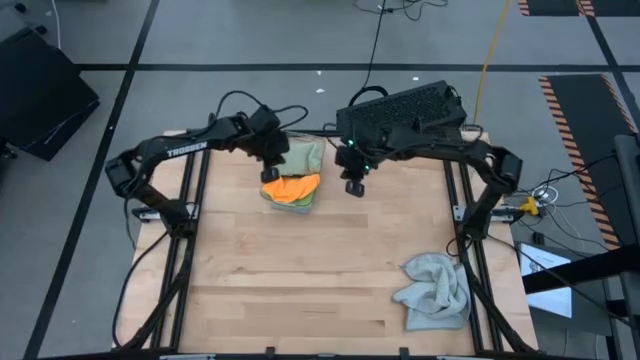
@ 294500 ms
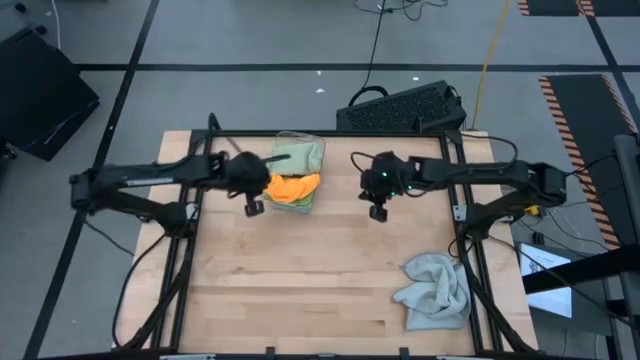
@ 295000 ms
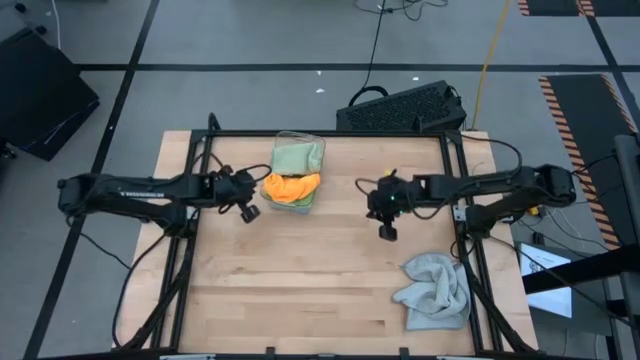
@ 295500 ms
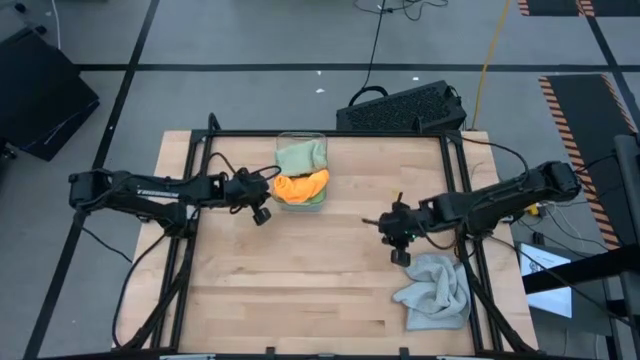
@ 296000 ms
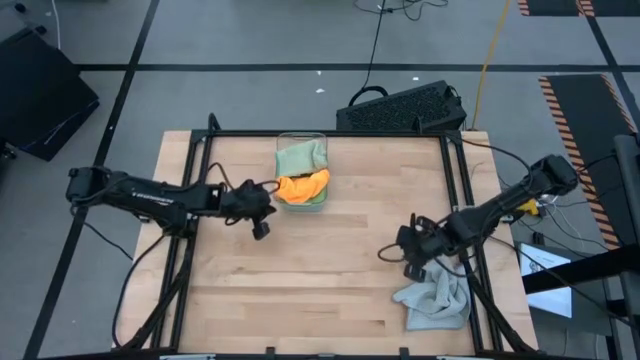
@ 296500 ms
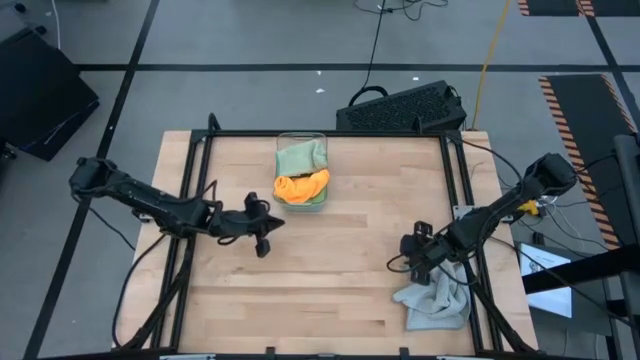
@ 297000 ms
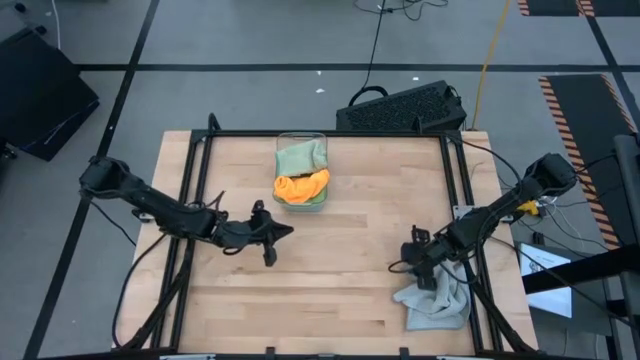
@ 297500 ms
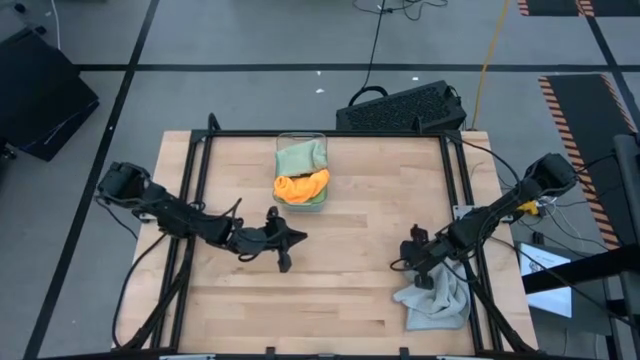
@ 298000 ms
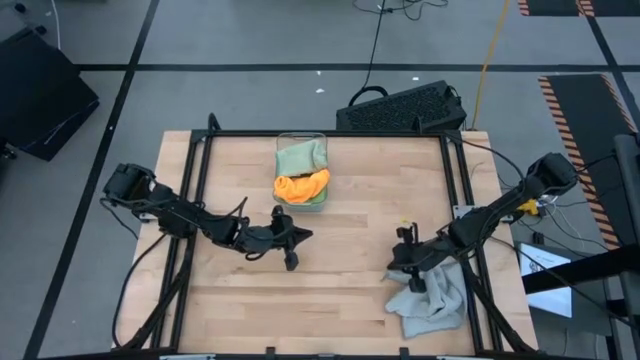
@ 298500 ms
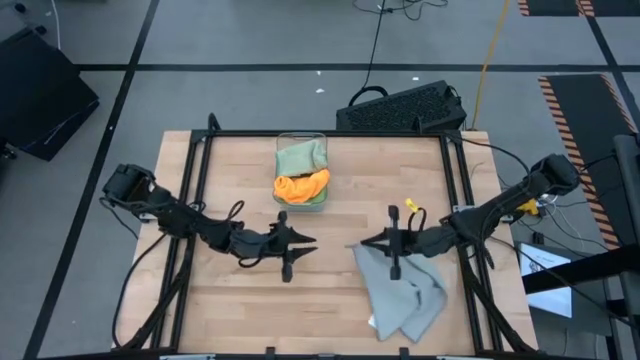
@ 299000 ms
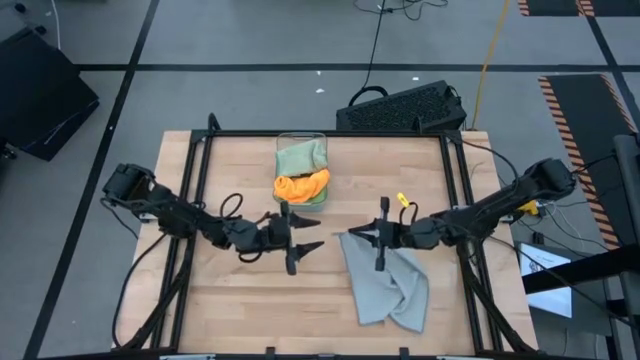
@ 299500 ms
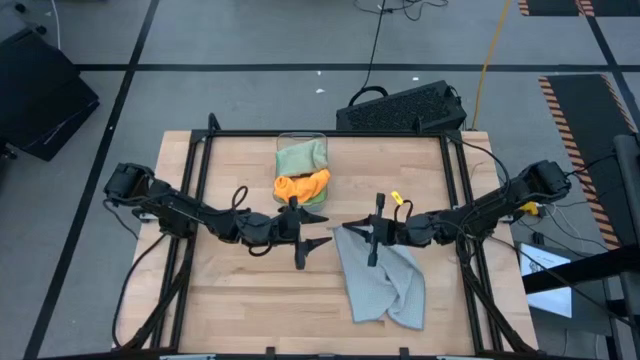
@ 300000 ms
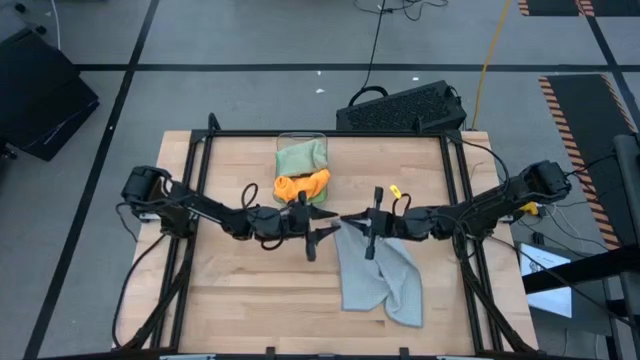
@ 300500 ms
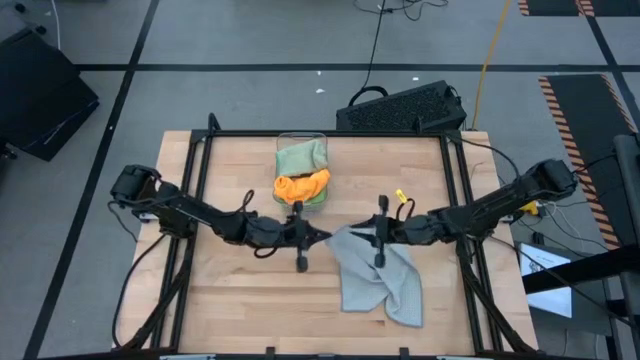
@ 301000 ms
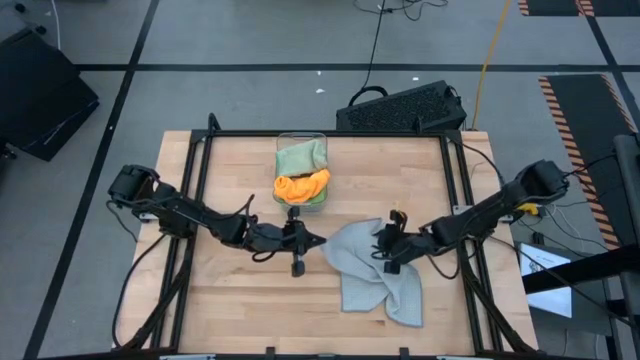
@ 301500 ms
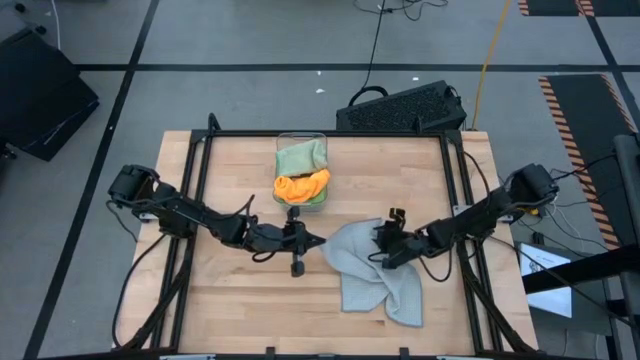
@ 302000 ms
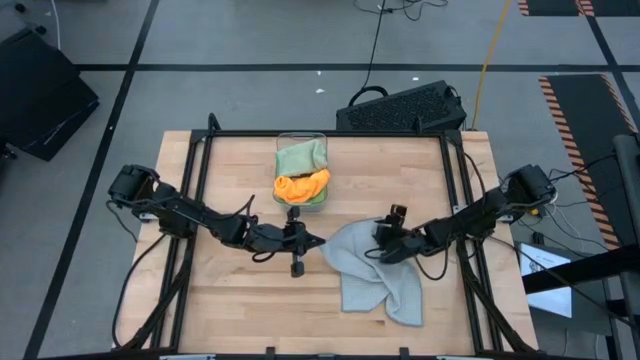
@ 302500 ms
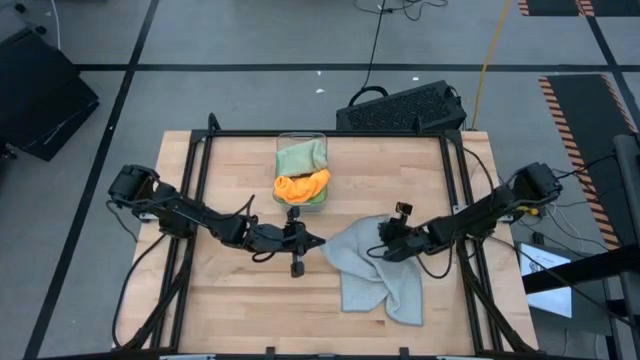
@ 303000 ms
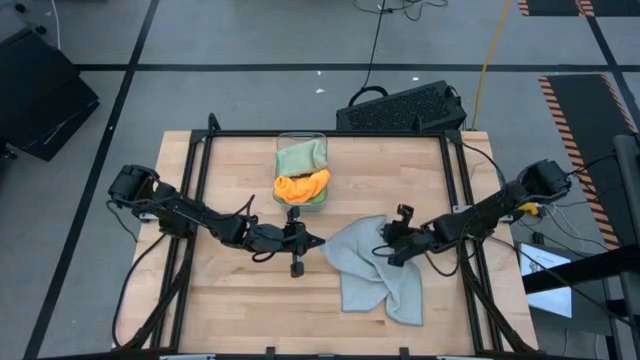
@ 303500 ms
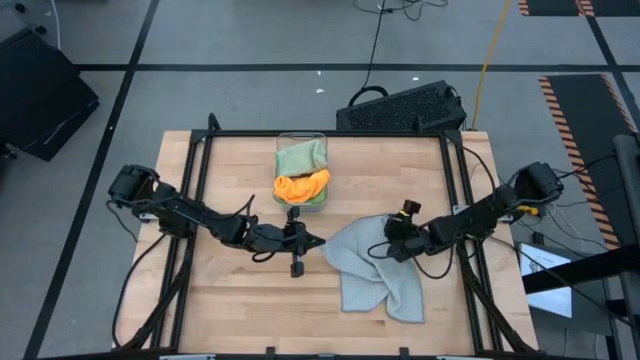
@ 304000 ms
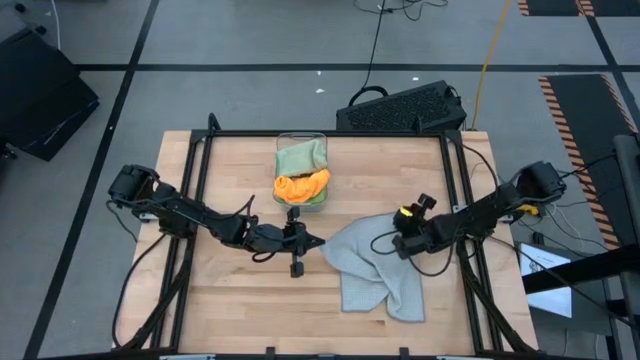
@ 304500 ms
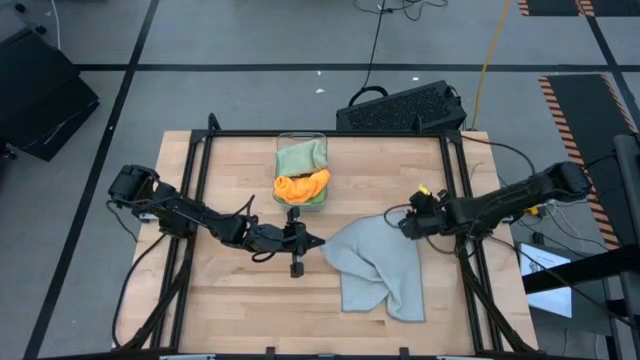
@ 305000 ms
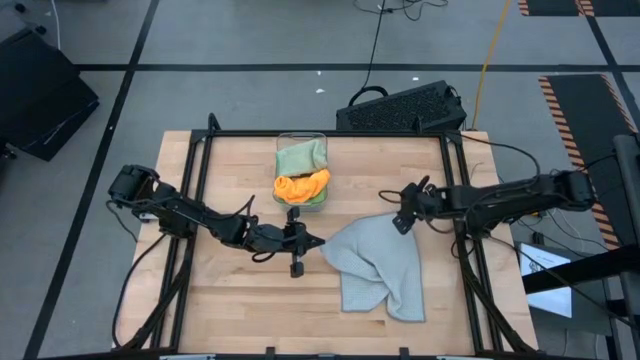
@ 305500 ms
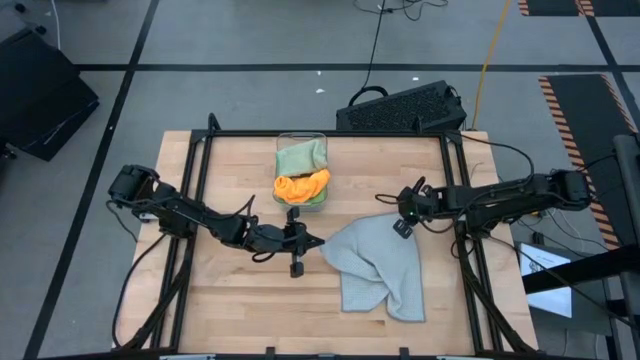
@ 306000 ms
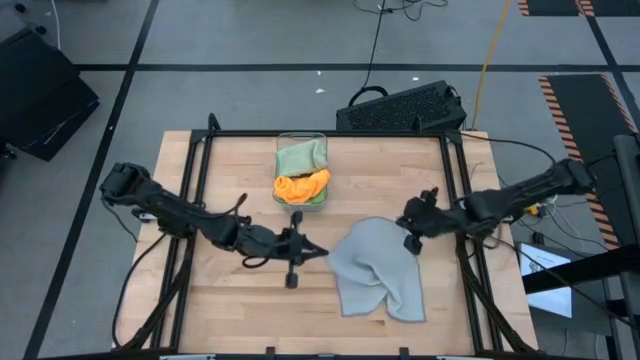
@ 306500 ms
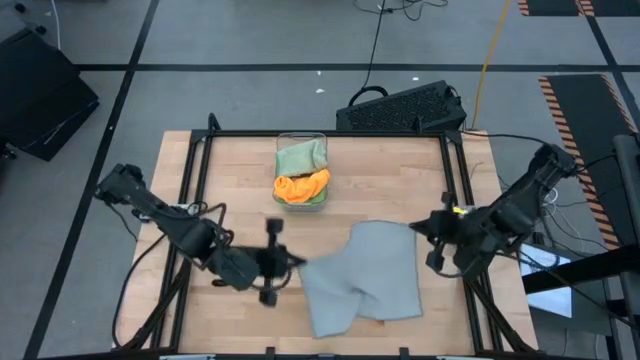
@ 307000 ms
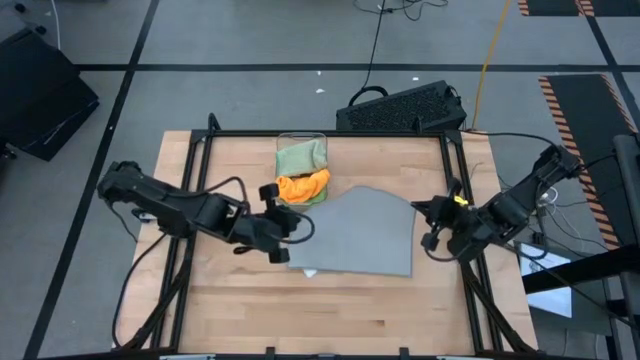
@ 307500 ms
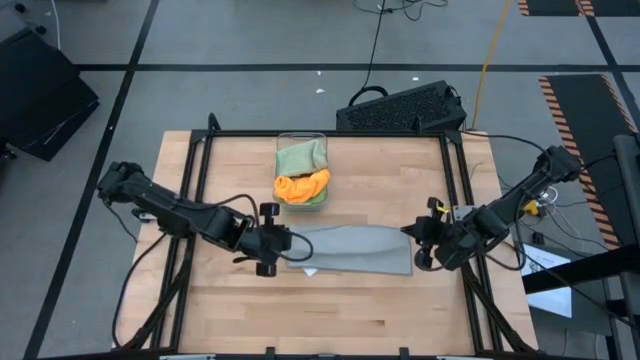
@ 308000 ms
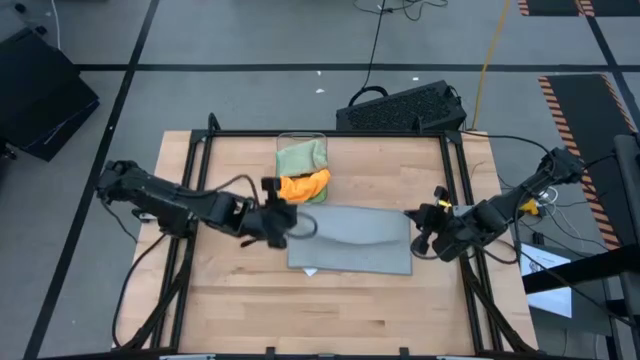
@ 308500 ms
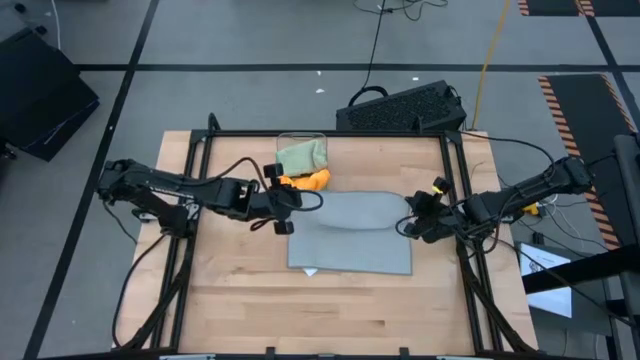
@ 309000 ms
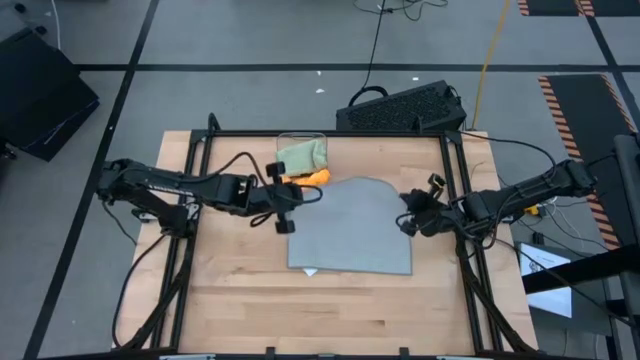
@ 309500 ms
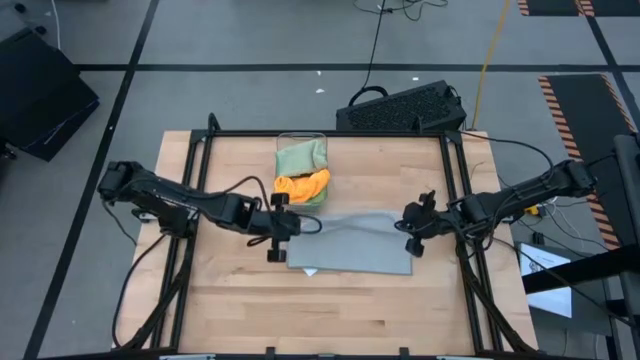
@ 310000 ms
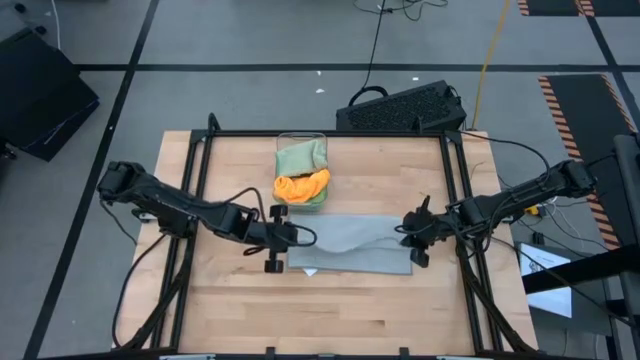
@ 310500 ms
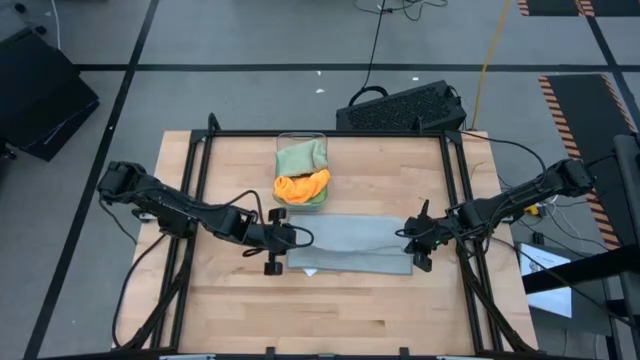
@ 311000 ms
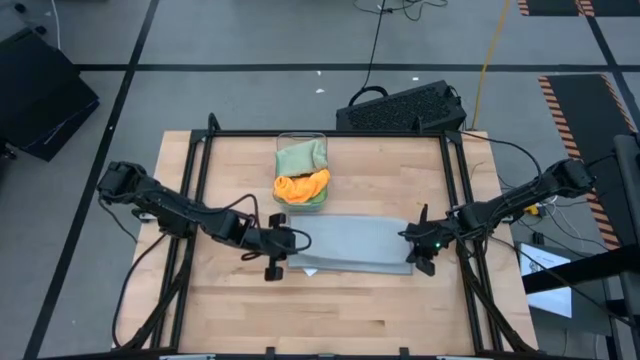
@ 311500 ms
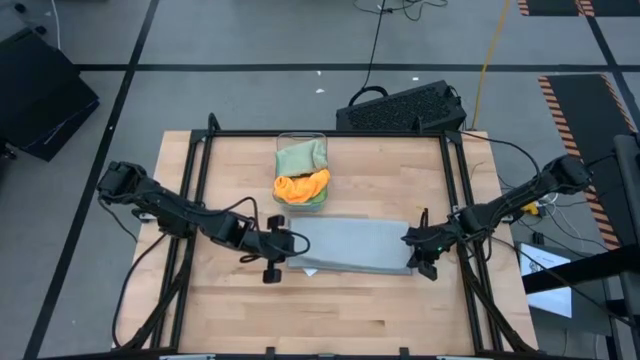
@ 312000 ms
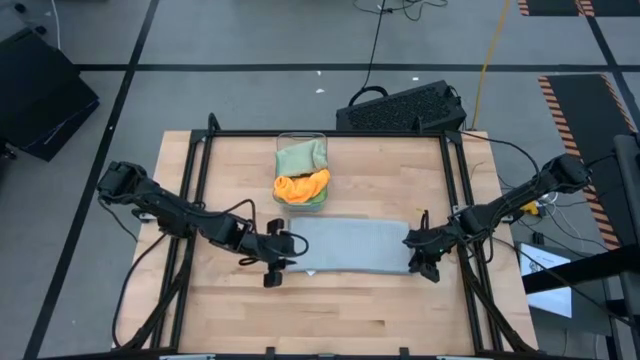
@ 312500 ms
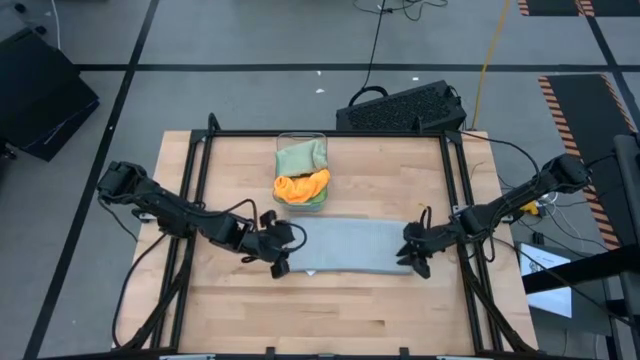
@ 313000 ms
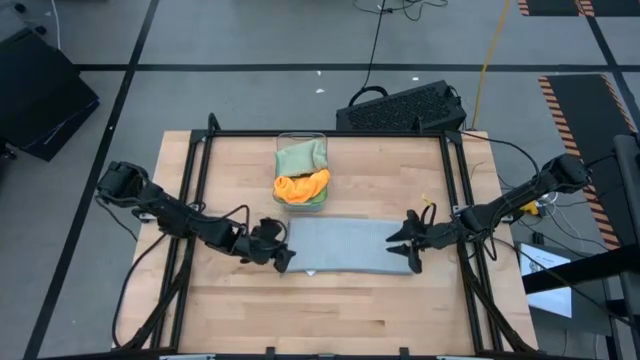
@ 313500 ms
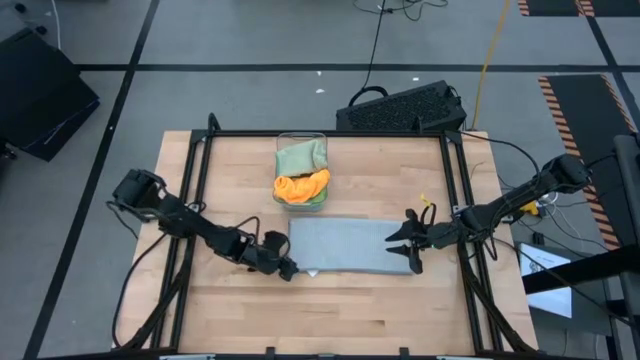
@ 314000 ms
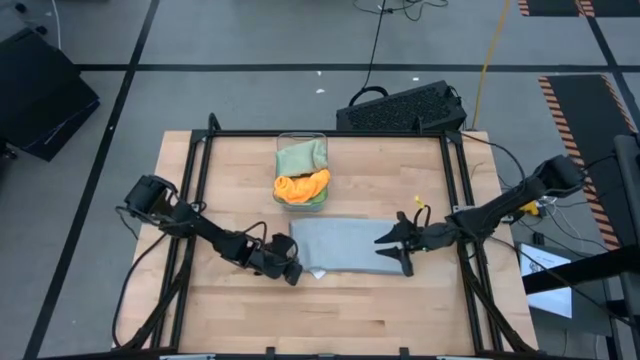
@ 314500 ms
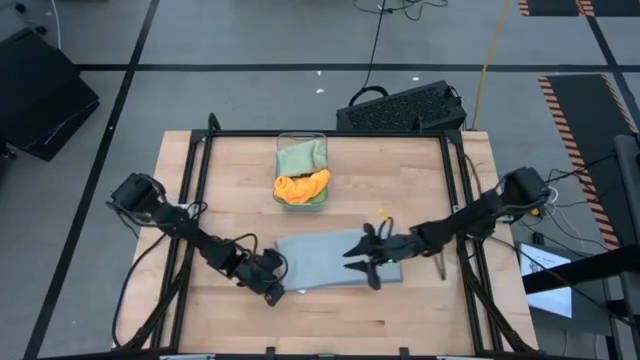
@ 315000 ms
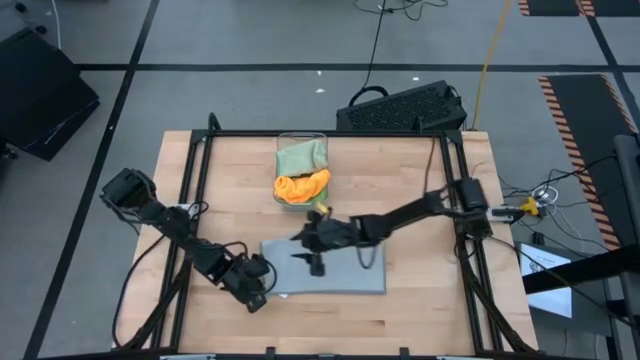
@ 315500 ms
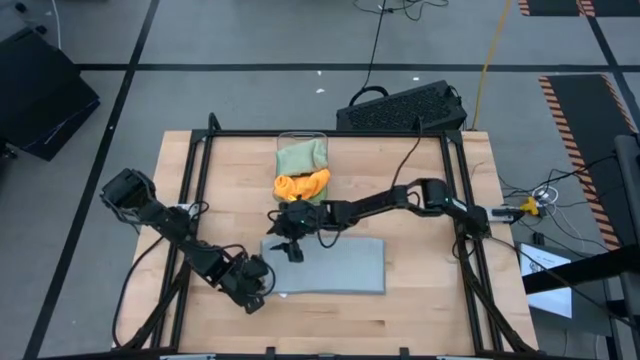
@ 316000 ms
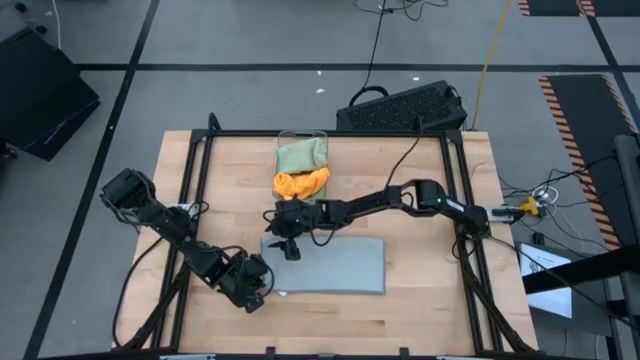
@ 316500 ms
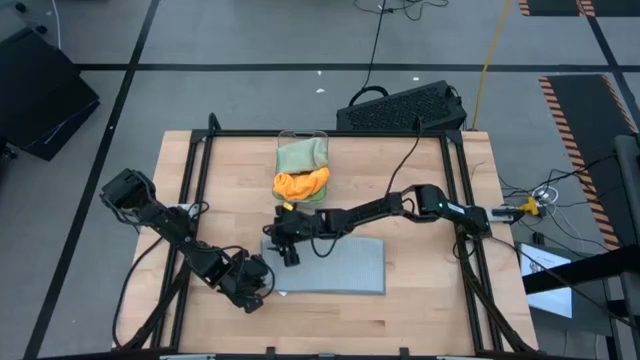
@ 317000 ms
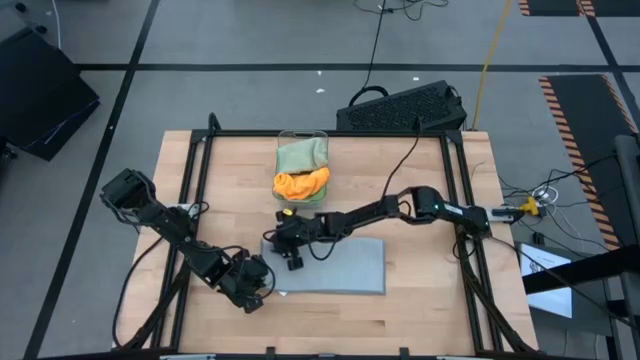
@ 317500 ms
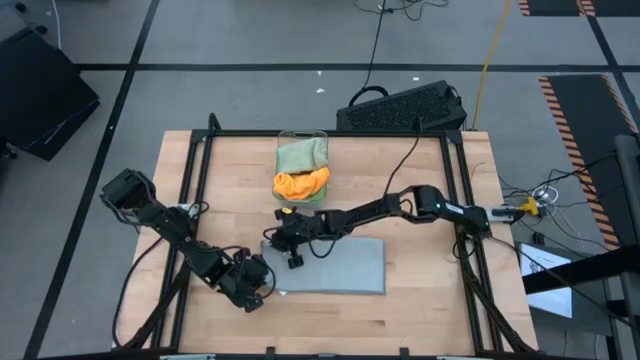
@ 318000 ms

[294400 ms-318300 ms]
Task: Fold microfiber towels
Fold the gray towel
